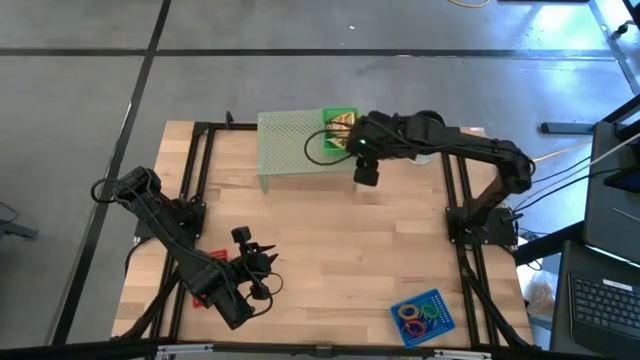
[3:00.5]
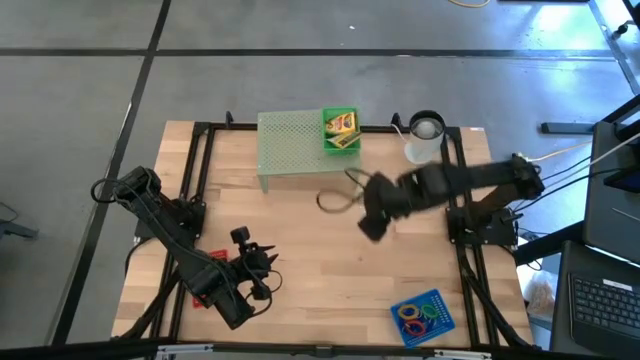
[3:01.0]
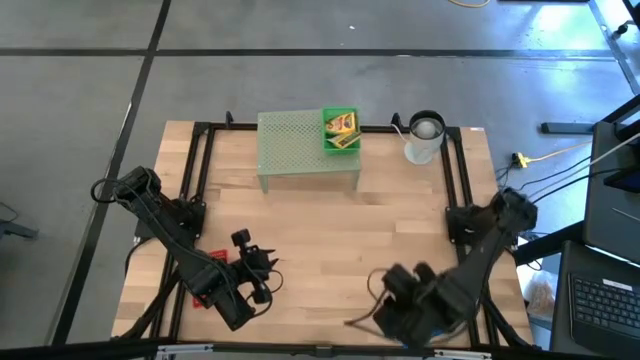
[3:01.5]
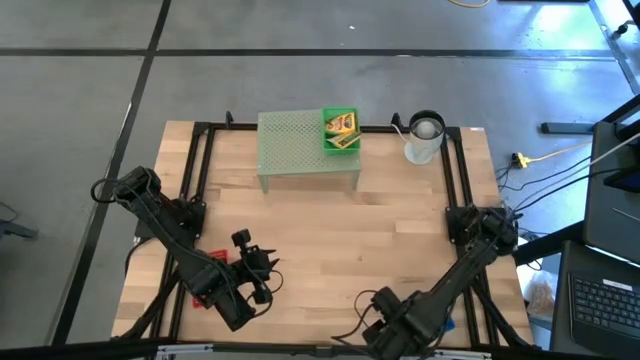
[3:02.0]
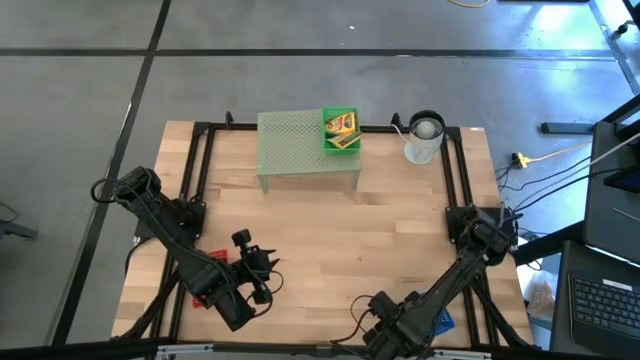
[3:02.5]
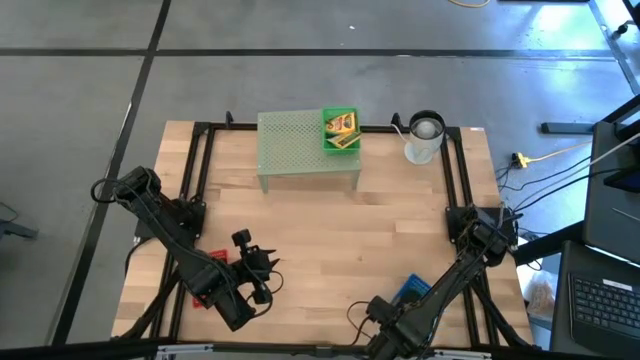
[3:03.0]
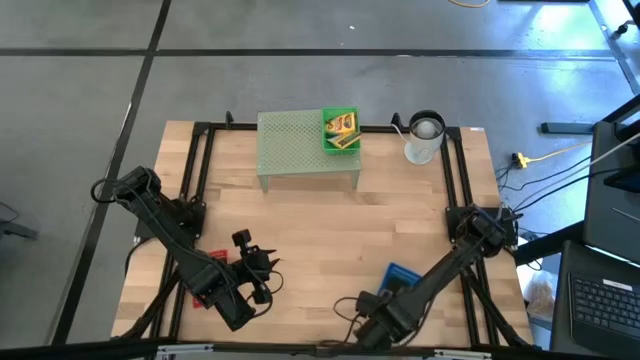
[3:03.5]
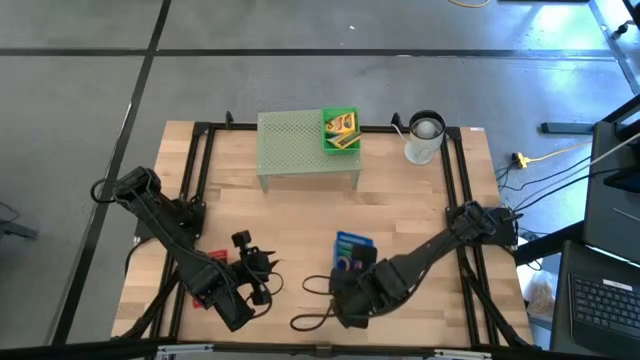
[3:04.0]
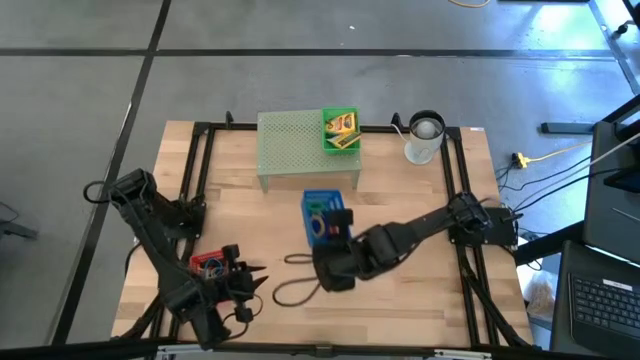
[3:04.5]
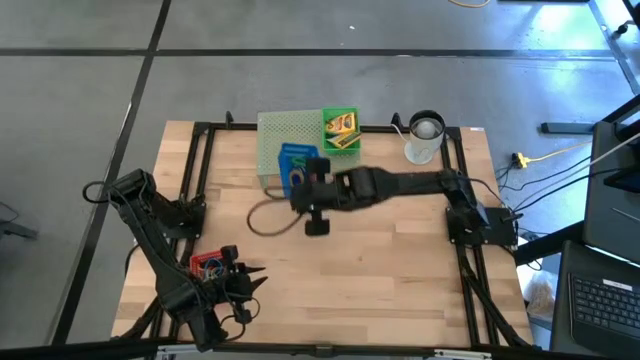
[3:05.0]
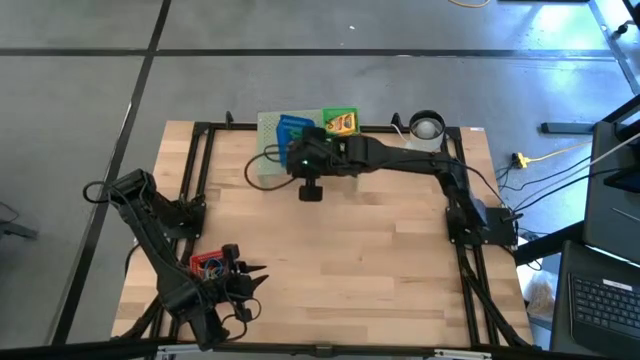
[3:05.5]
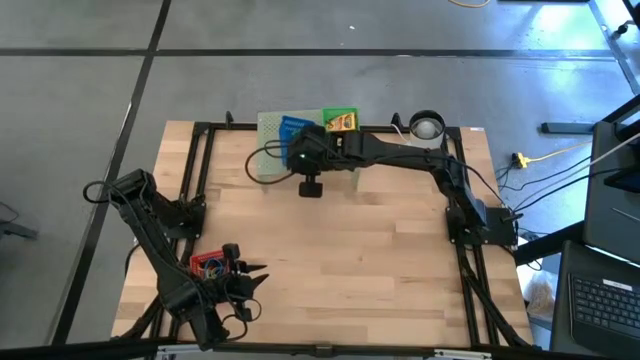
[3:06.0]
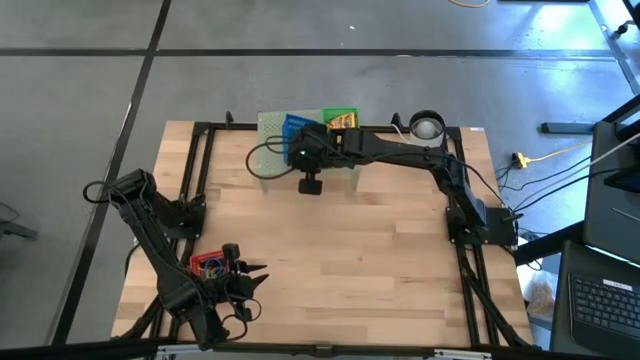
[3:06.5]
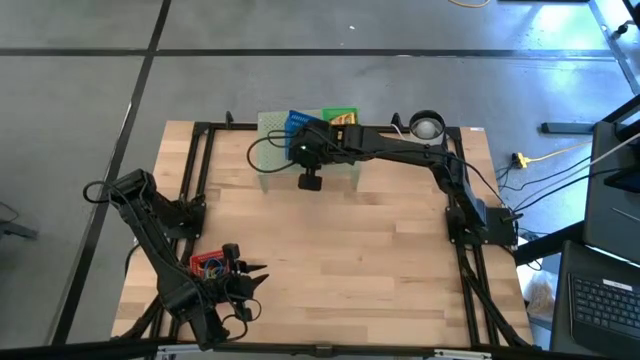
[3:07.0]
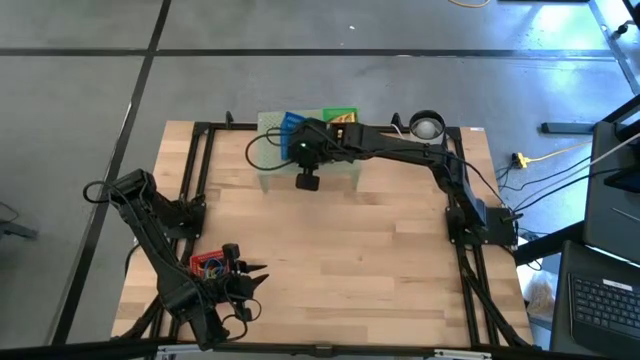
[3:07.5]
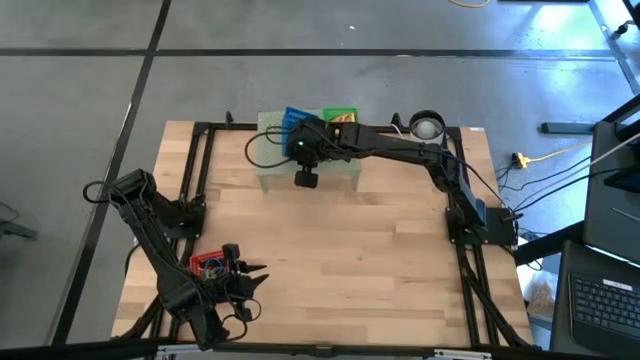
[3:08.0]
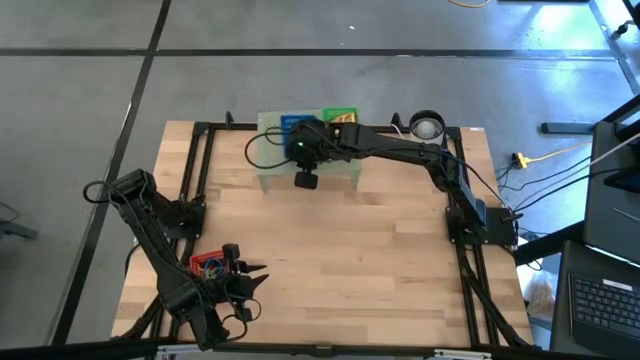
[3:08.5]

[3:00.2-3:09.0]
Task: Pick & Place Office Desk Supplies
Put the blue bin on the shelf

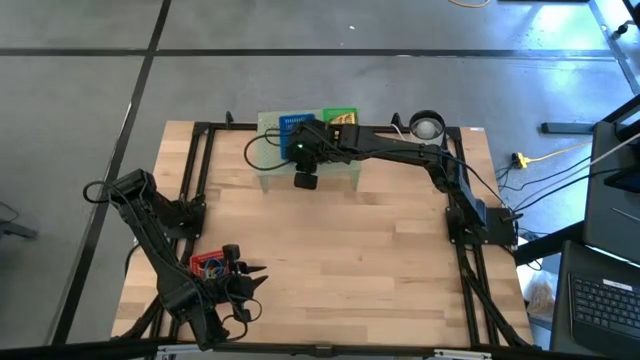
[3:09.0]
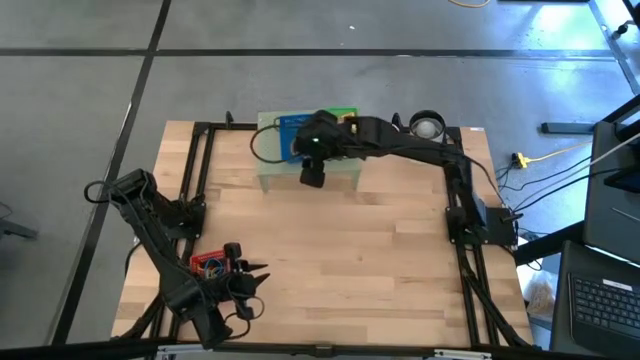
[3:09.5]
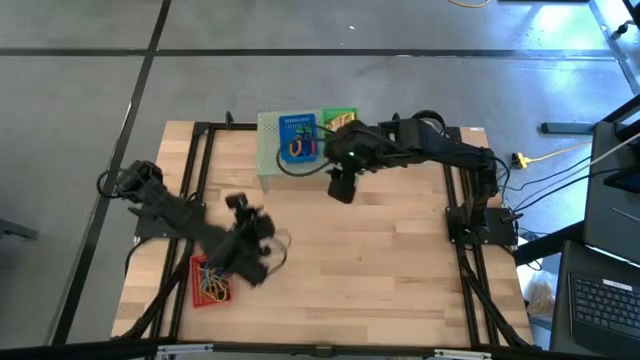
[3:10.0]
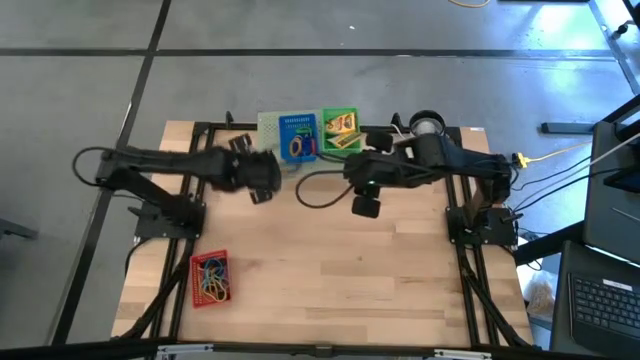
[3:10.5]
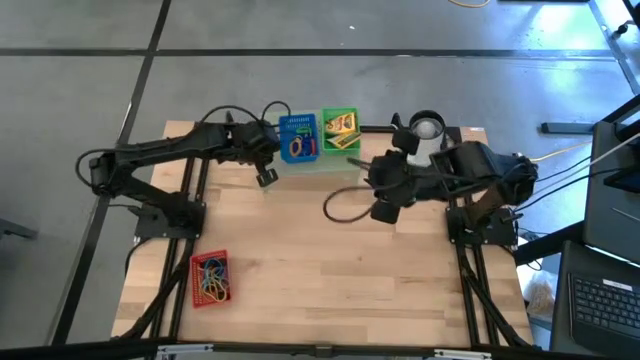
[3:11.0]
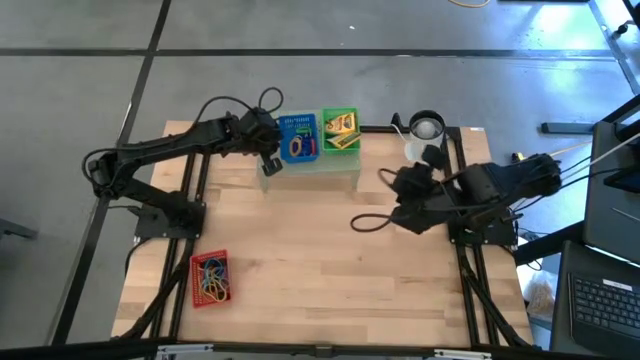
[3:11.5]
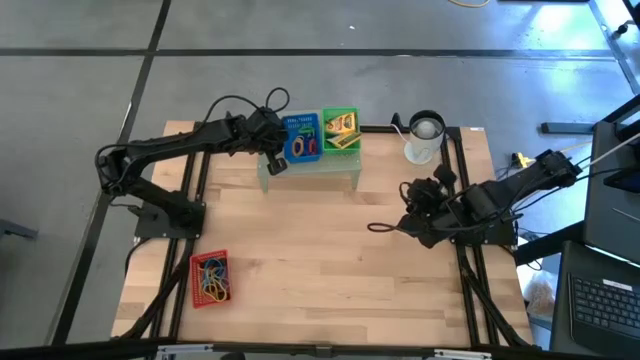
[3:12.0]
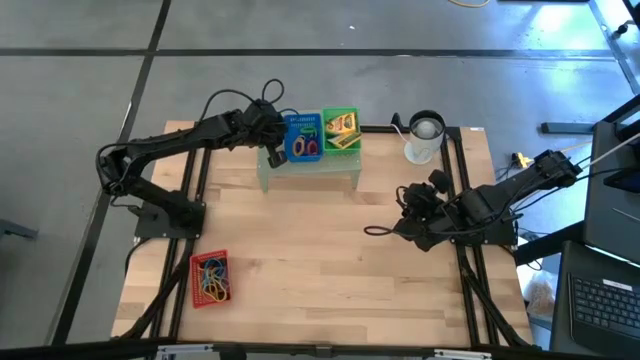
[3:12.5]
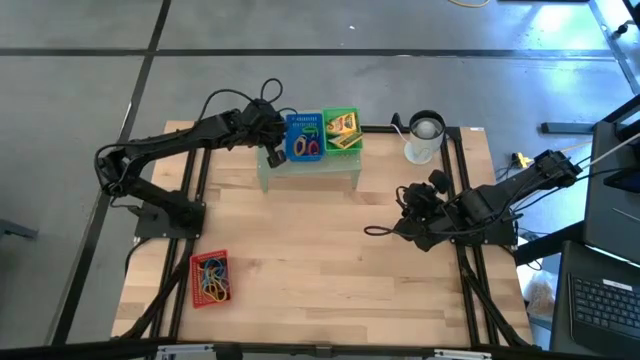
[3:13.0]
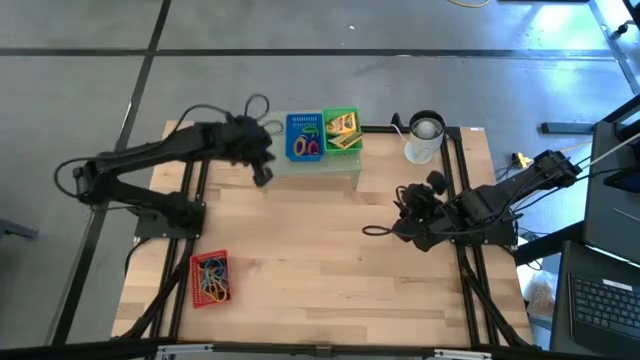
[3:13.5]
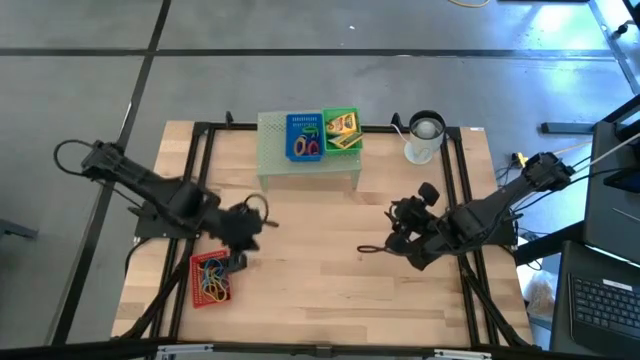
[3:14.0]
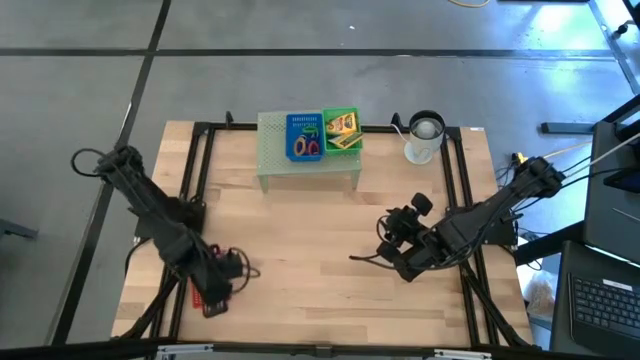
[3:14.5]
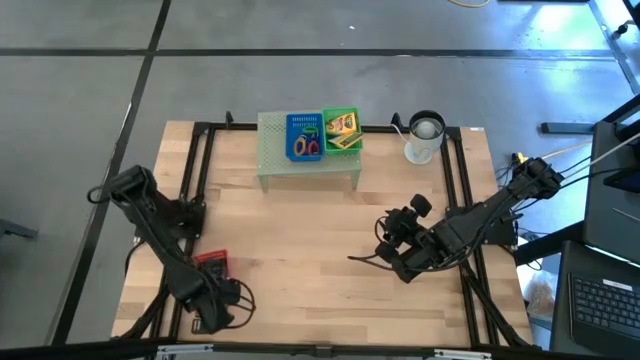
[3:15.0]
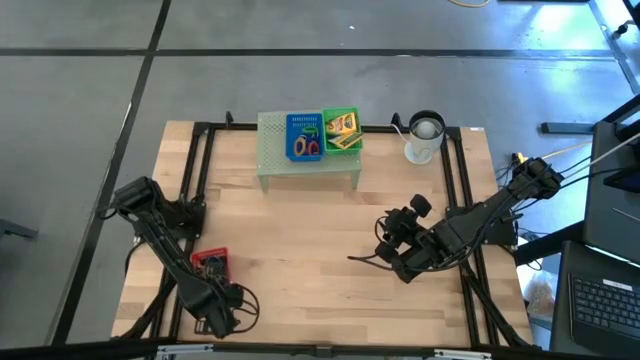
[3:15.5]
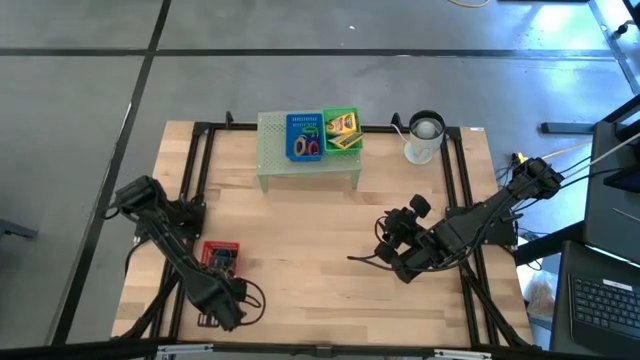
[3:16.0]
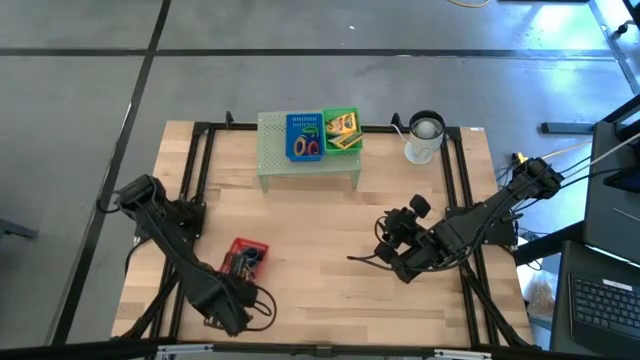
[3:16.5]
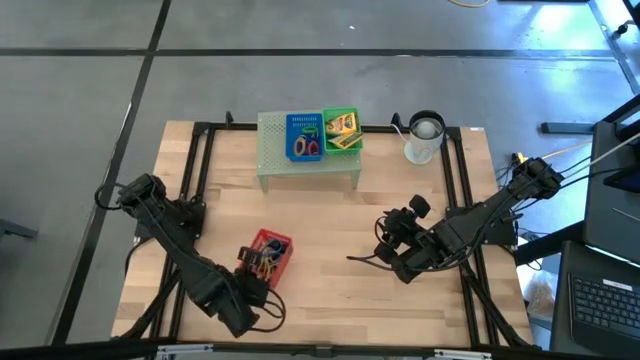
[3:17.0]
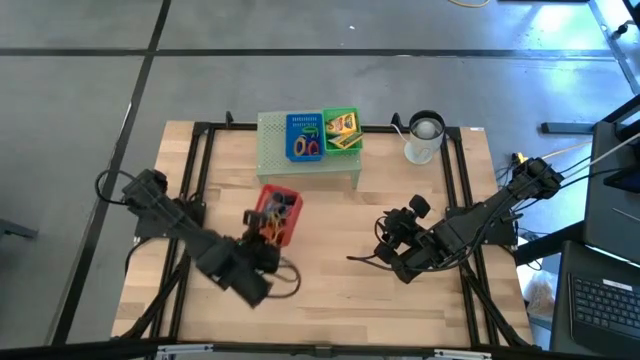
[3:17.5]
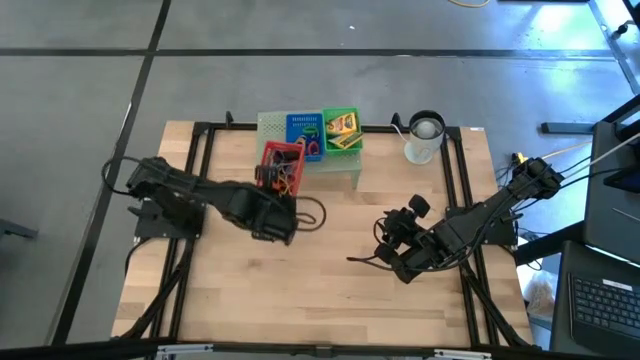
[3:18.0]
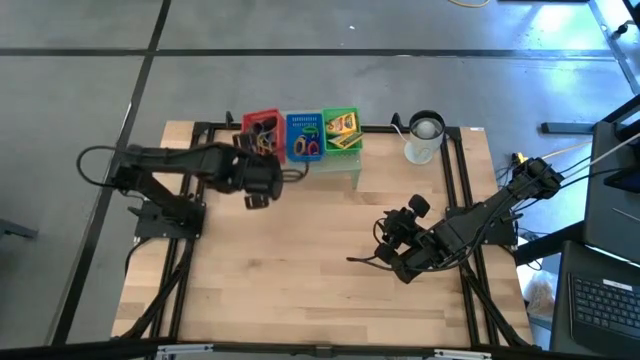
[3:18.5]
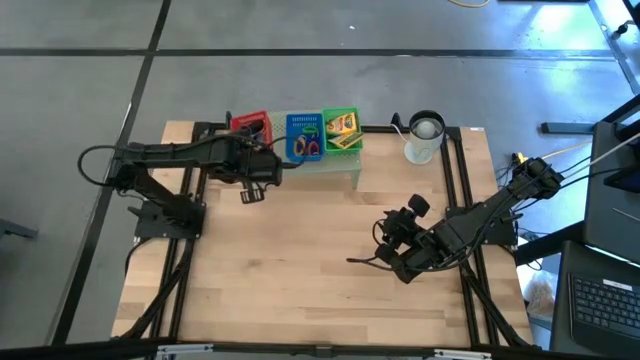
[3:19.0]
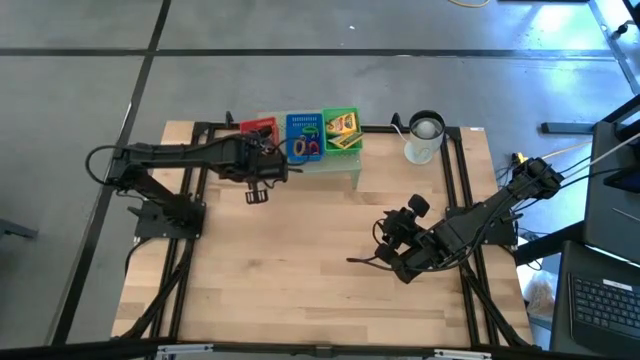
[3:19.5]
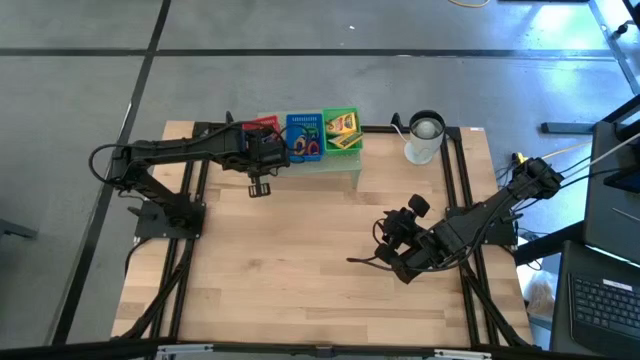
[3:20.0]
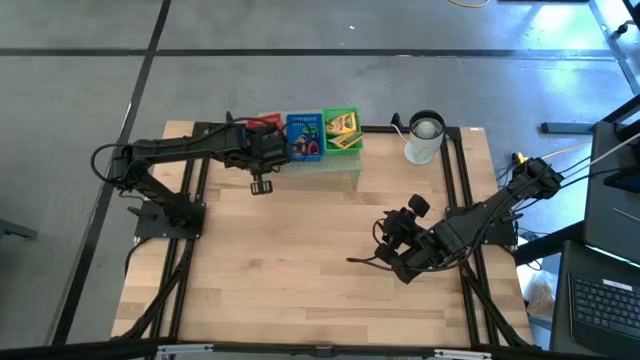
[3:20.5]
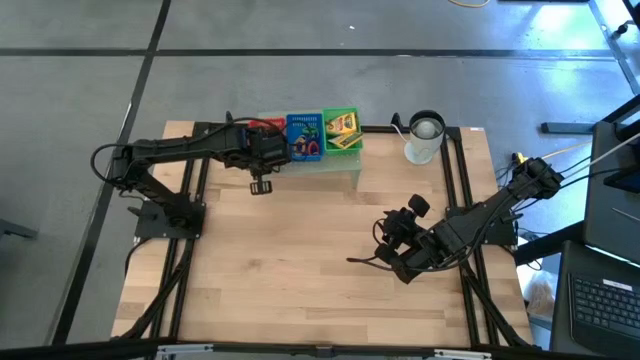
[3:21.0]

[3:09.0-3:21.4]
Put the red bin on the shelf
